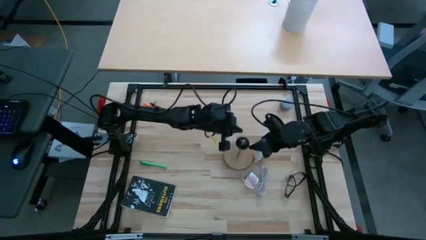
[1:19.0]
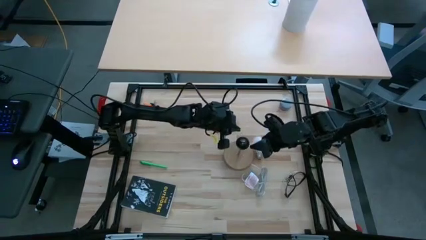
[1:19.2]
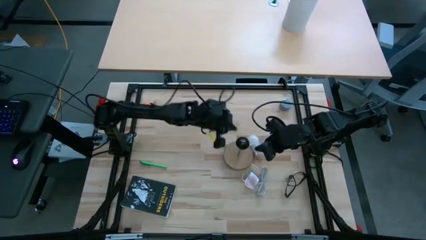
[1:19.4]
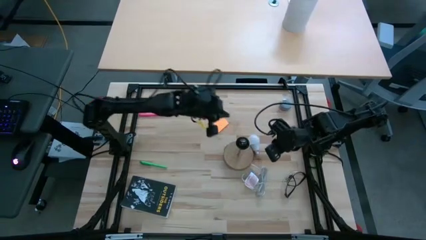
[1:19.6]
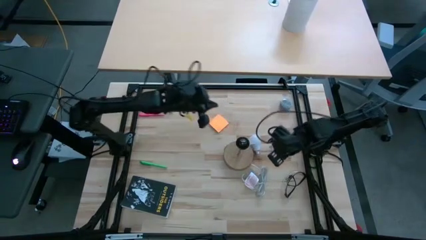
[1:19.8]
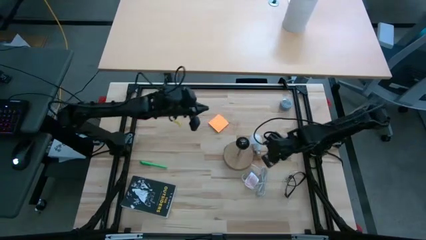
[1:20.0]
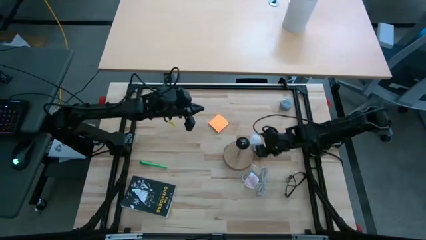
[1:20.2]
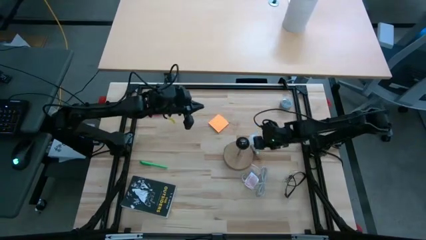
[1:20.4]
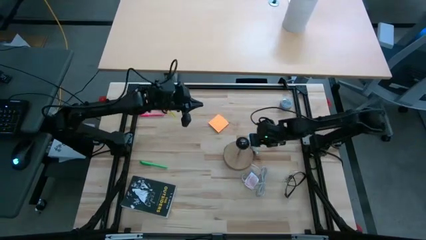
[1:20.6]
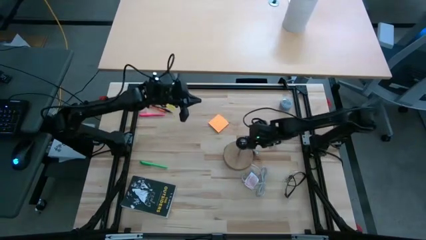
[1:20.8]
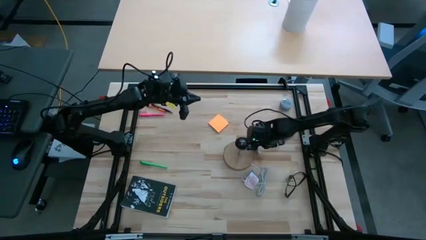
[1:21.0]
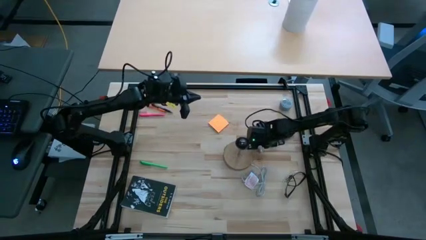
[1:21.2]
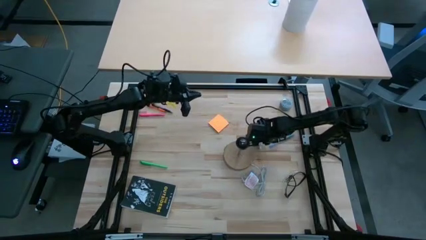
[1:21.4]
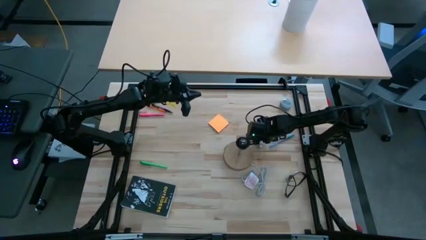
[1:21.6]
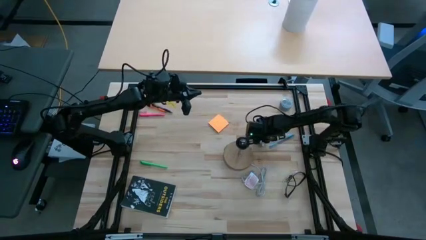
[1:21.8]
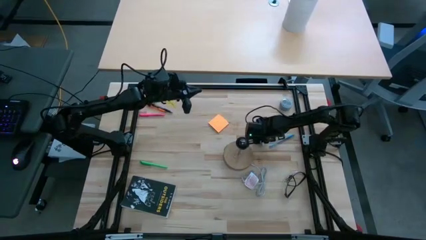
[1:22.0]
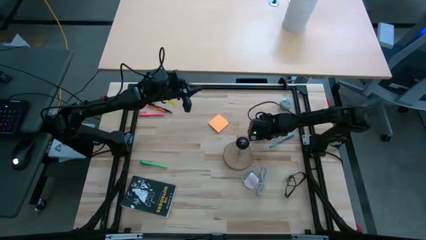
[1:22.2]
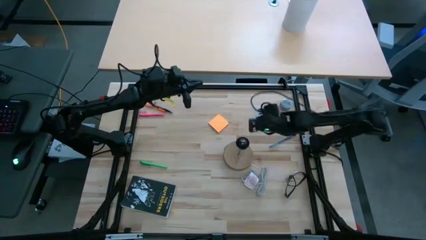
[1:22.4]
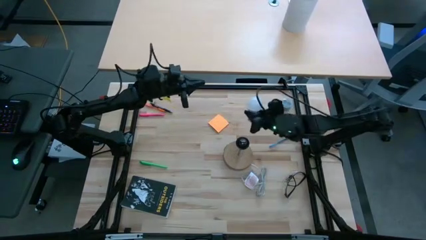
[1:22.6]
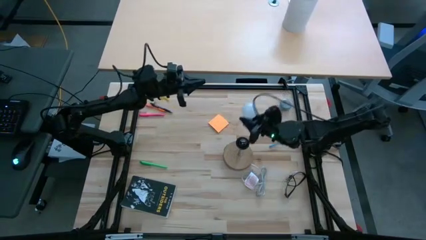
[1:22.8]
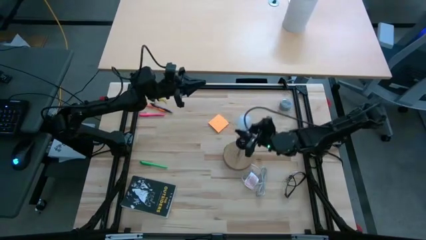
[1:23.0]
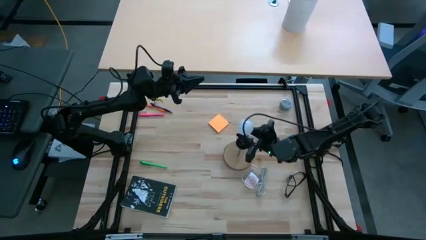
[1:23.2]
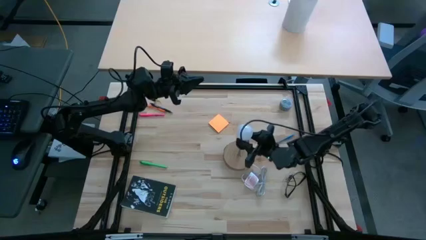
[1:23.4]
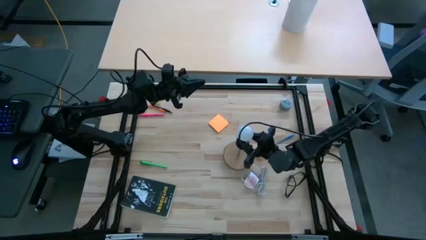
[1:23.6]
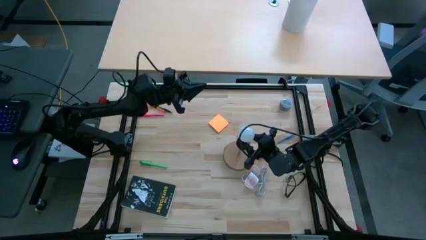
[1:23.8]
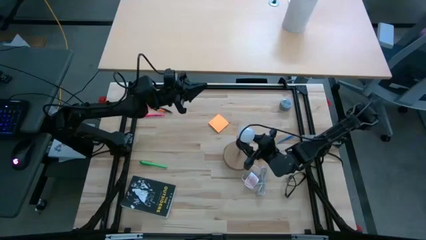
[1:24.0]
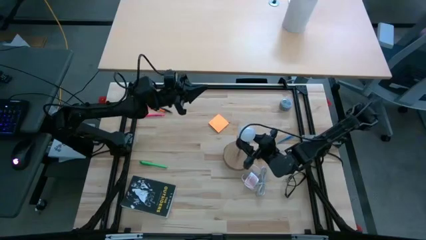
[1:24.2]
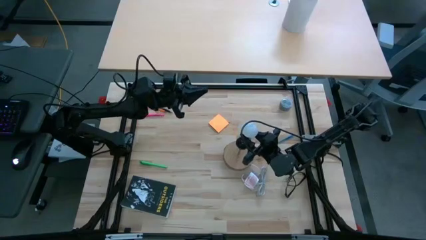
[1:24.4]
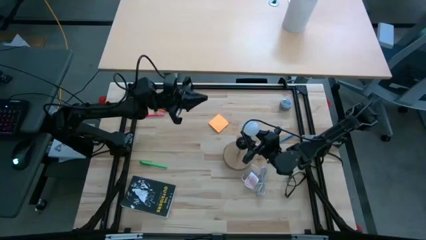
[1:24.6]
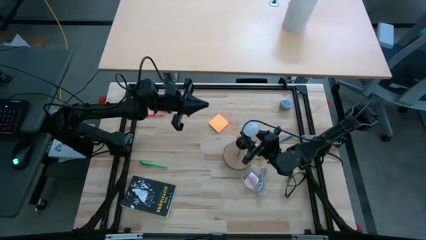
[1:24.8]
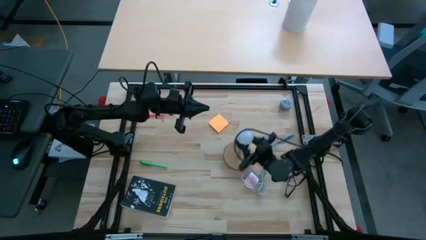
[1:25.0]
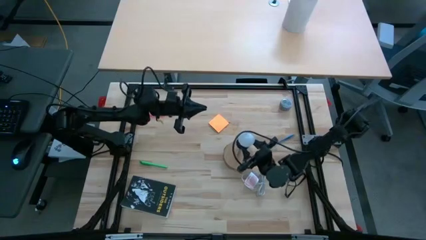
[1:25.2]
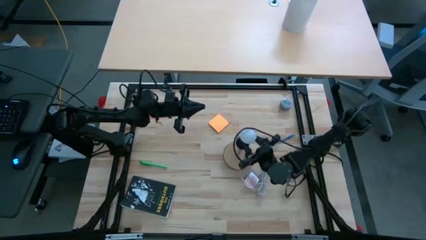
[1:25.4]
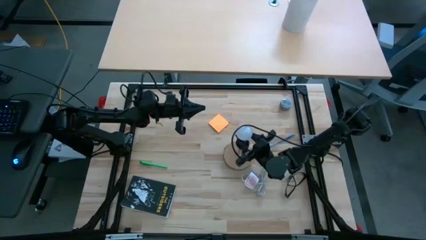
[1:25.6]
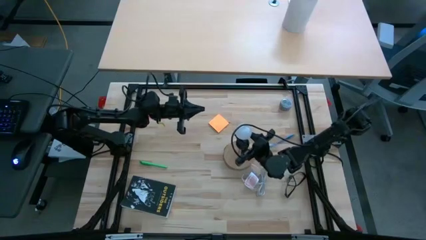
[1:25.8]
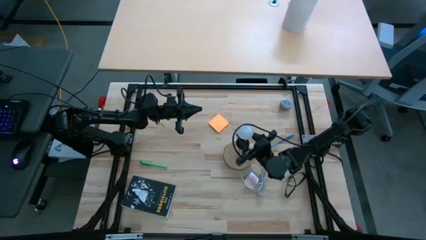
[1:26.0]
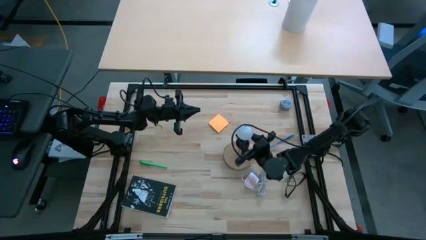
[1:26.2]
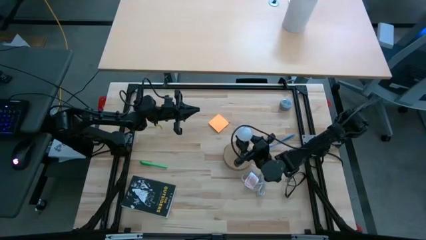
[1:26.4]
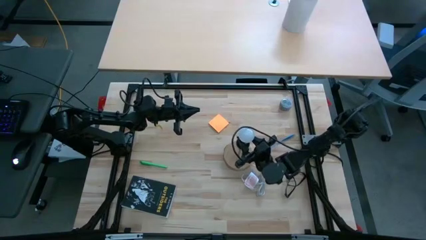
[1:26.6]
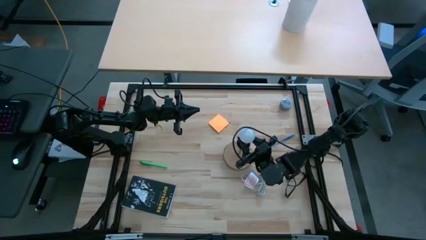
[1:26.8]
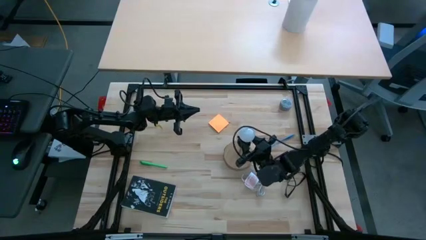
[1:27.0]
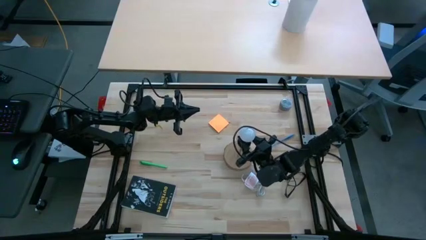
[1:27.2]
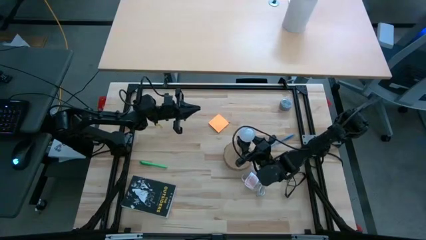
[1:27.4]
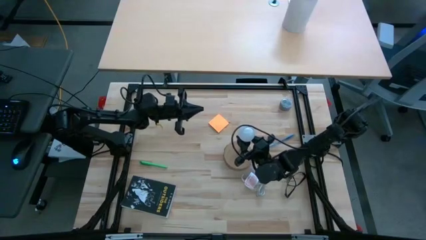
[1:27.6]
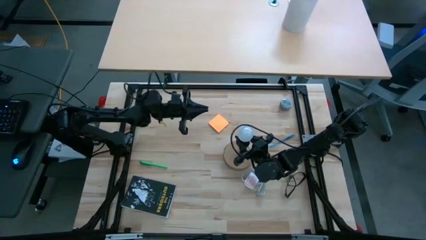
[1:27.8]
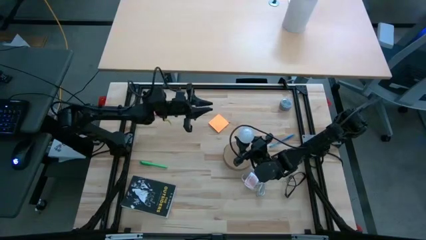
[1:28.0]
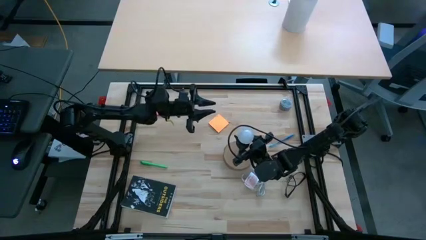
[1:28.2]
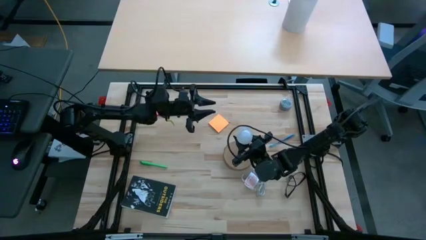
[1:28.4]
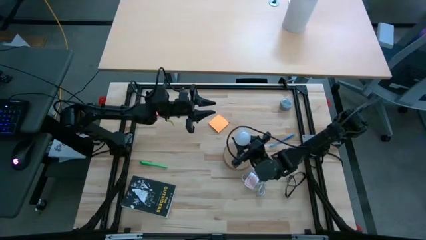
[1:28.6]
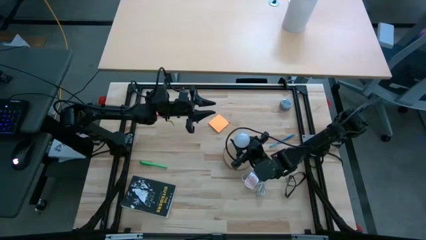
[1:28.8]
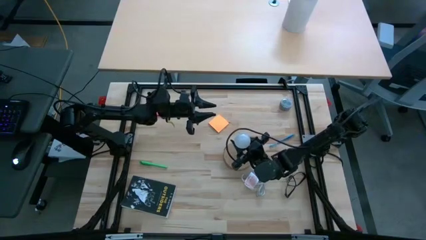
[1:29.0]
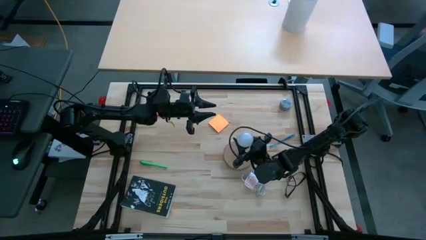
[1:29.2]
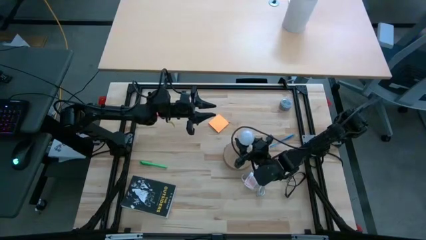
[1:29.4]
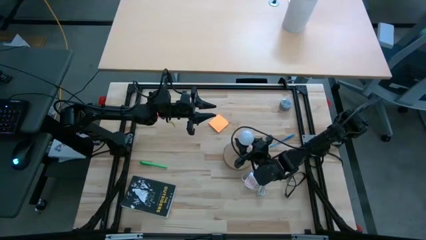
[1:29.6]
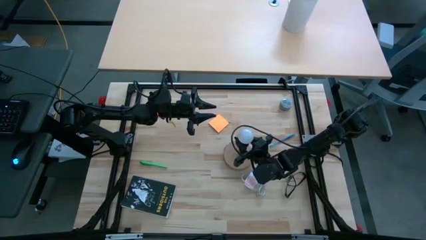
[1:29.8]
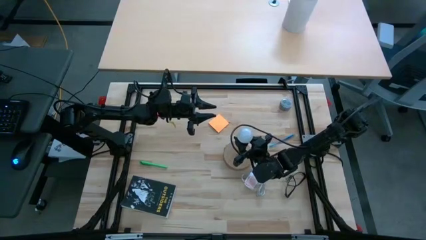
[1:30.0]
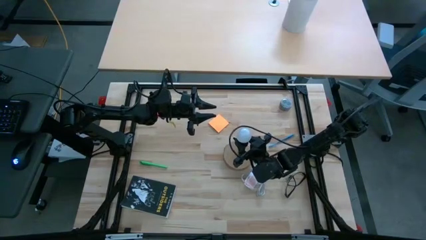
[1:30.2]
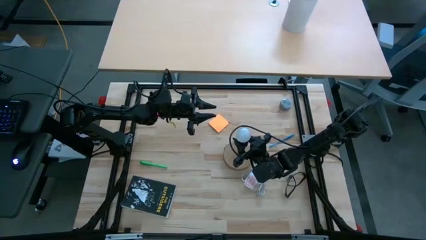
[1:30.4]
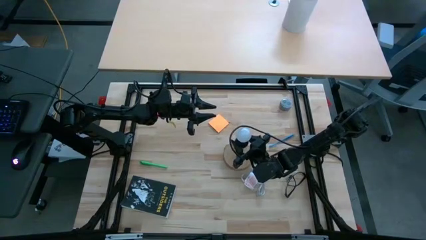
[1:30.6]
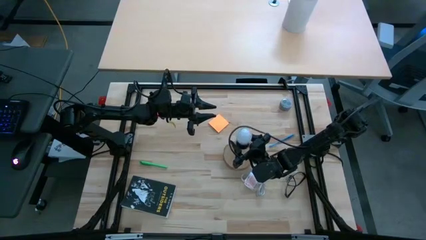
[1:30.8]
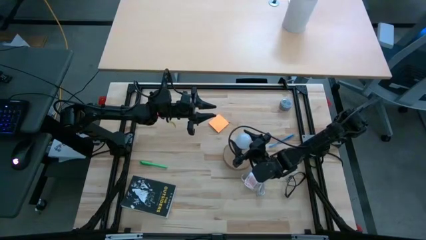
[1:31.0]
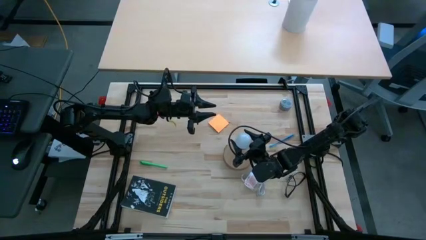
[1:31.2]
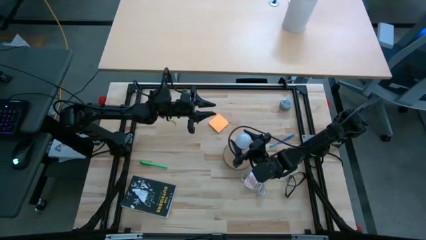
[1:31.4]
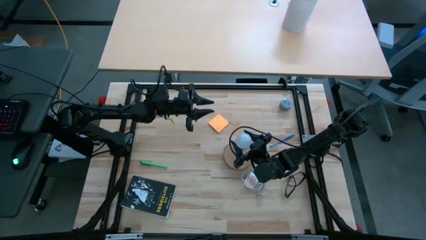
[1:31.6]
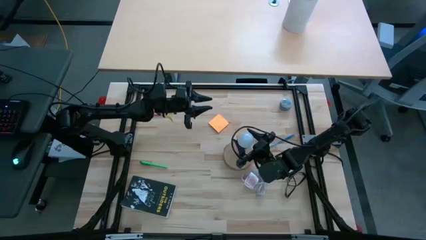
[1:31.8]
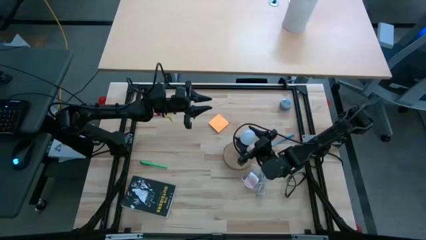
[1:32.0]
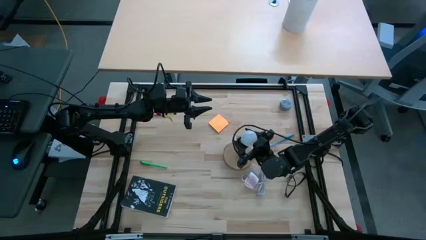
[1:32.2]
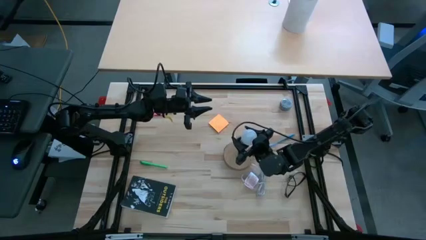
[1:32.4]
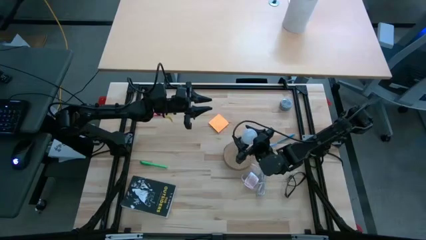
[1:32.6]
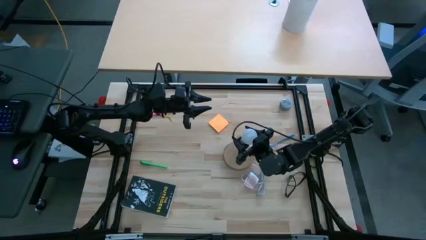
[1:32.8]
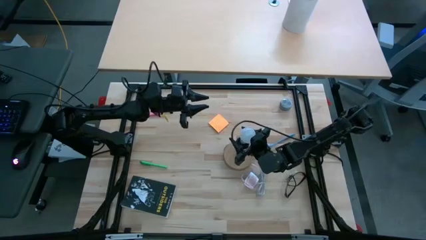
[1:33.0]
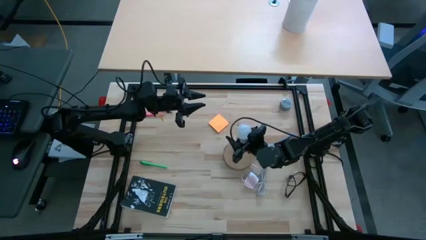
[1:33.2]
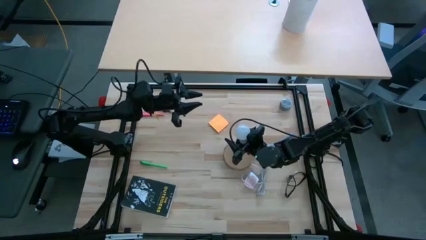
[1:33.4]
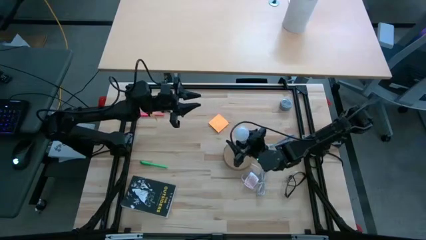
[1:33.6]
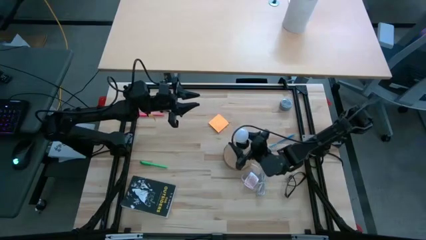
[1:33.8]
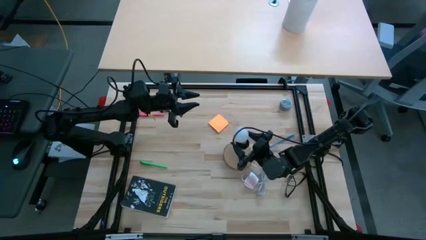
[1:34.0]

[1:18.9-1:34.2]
Task: Screw lightbulb
Insert the white lightbulb into the lamp
